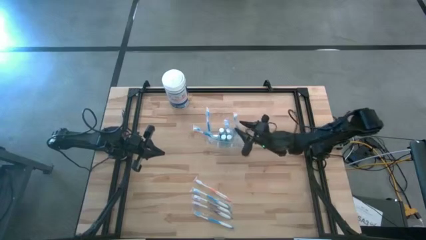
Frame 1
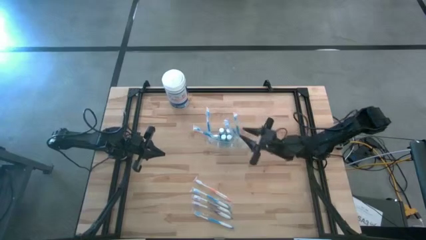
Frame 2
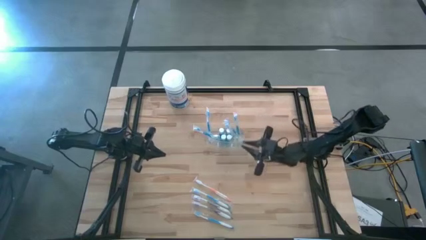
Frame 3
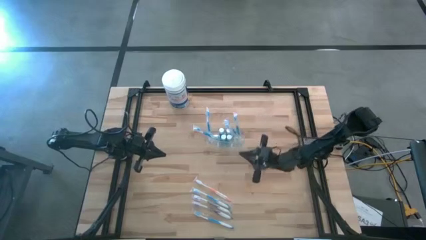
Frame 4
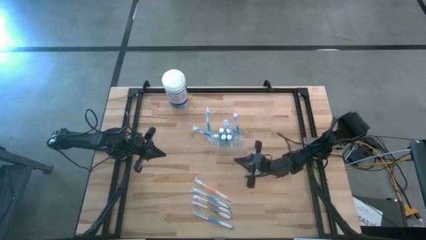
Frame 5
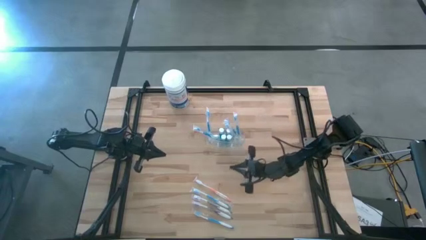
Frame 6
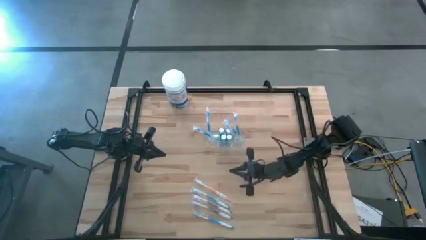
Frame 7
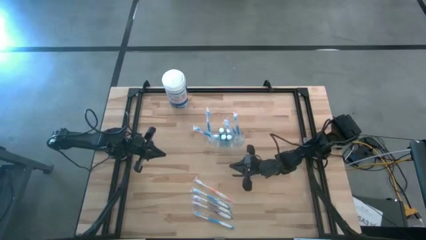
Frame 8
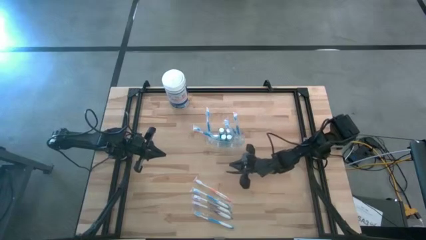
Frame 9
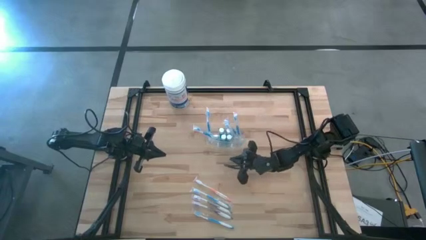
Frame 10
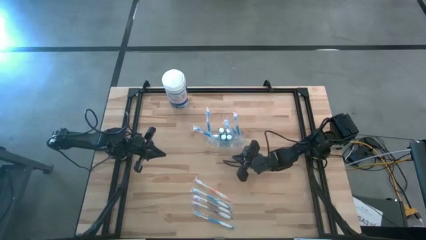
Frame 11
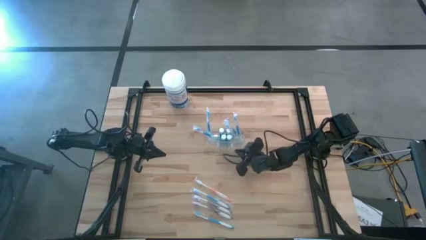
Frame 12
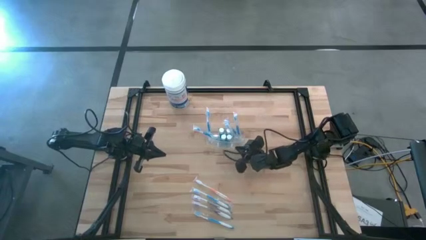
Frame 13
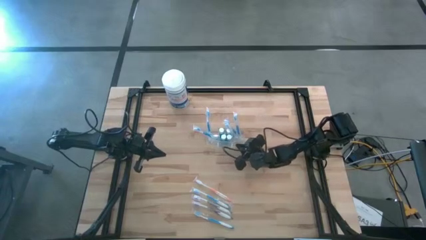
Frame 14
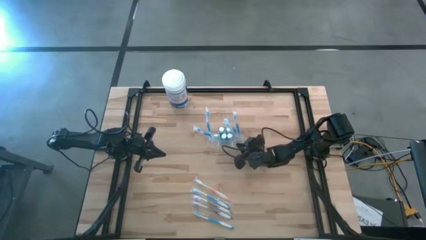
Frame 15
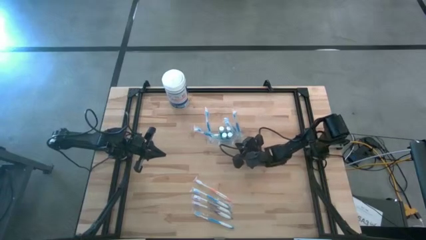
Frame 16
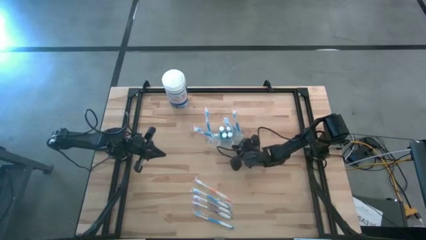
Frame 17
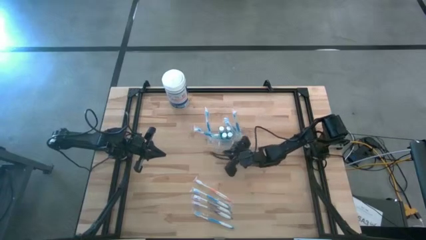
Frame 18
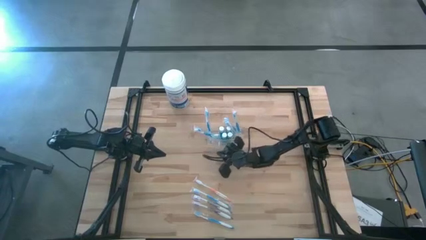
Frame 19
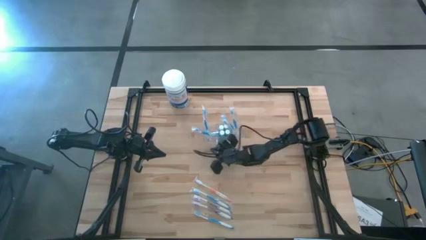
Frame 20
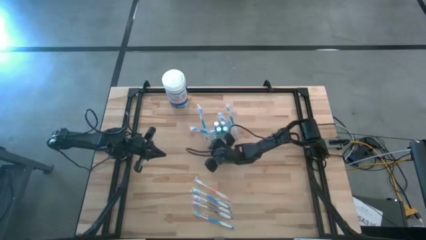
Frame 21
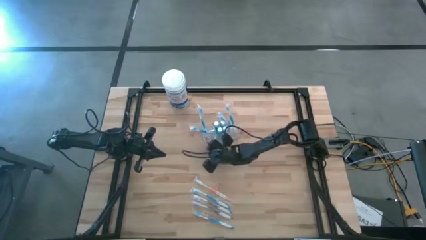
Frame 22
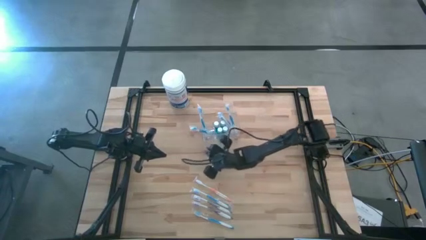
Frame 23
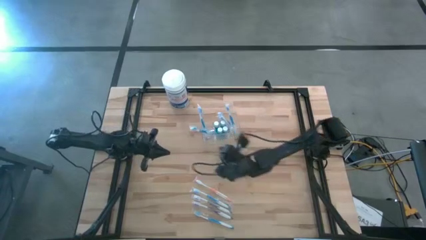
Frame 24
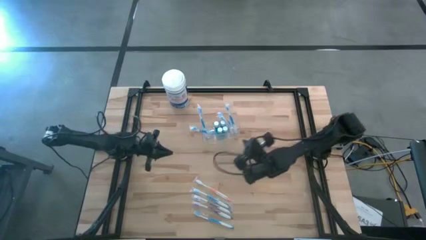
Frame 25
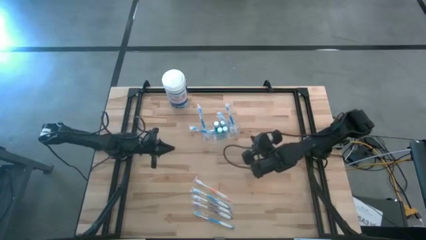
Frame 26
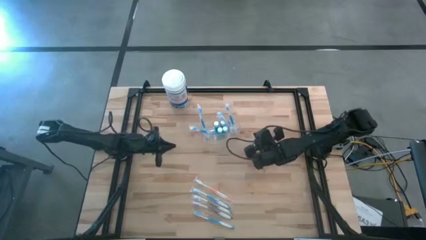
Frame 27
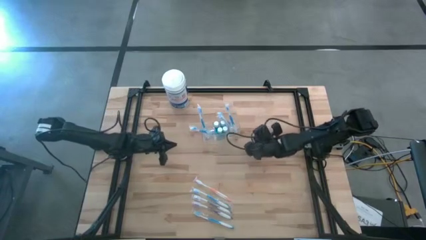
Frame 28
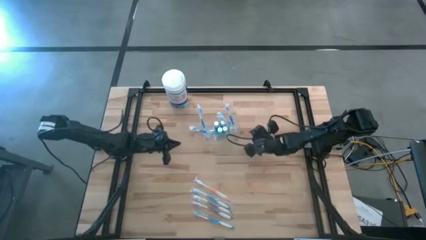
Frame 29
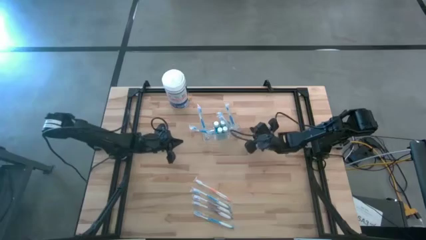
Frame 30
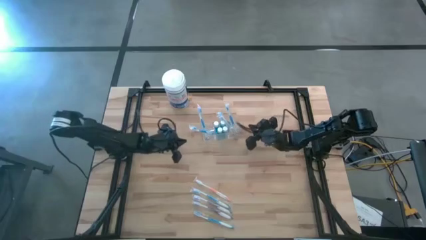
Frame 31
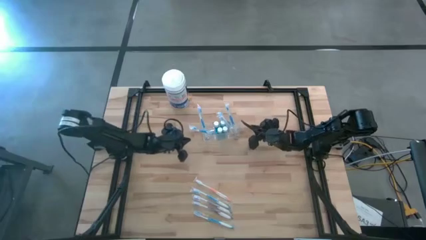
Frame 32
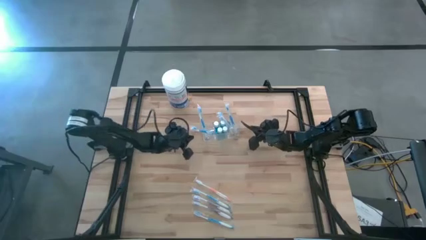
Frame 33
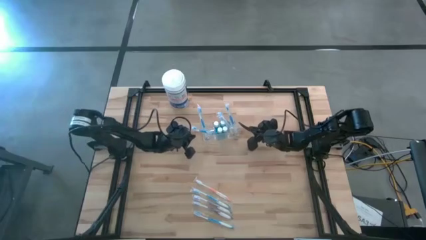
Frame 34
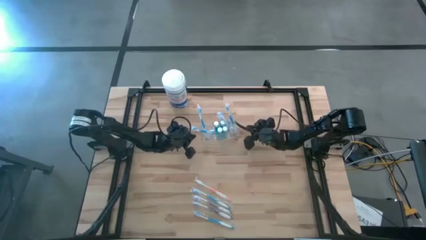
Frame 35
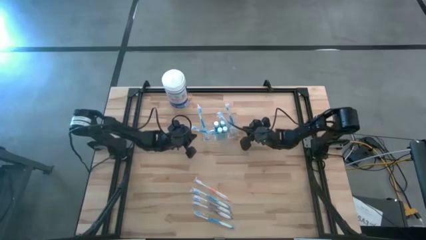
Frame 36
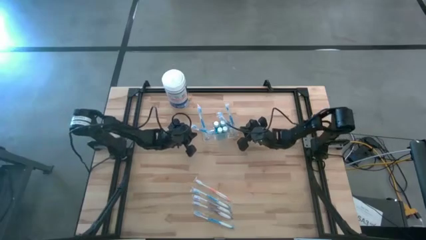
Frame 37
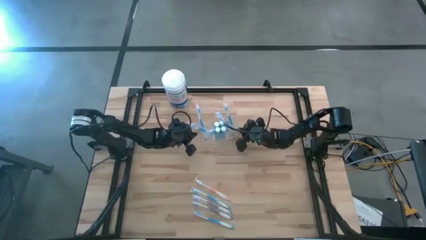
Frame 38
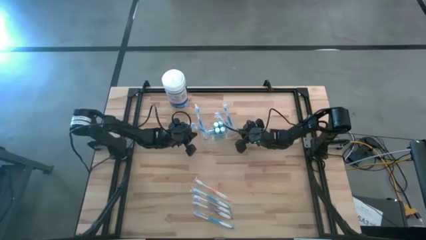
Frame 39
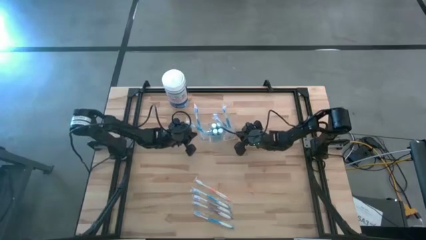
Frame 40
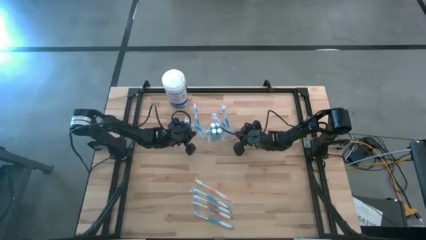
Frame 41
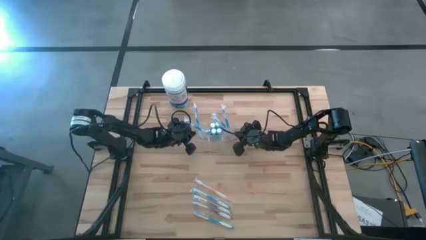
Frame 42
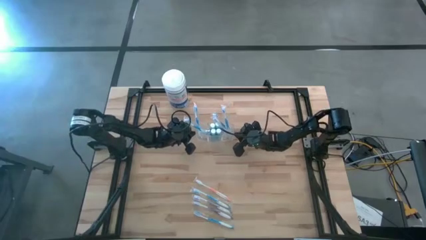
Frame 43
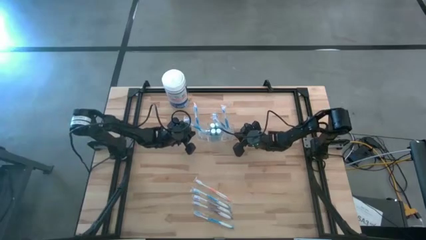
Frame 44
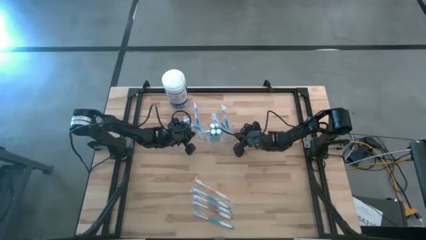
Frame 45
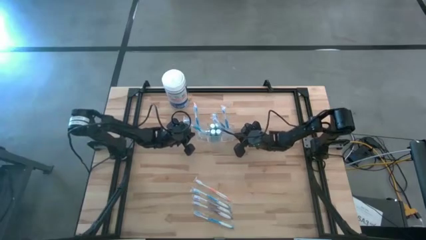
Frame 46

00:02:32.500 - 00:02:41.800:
Task: Pick & Place toothbrushing station
Adjust the transparent organizer

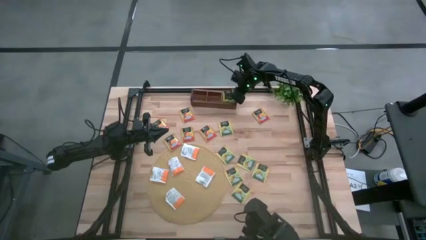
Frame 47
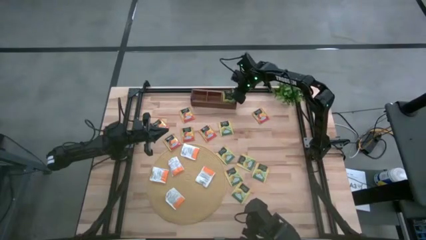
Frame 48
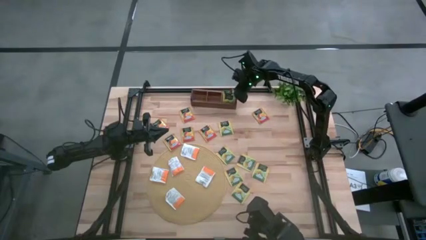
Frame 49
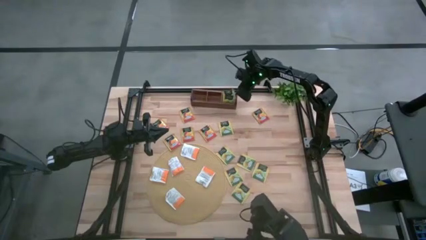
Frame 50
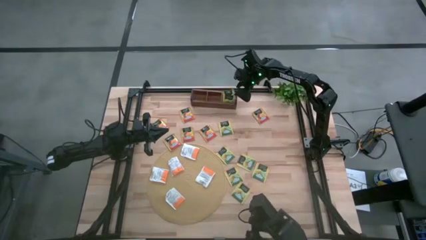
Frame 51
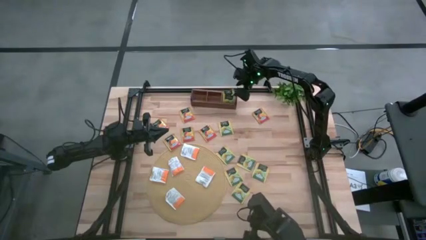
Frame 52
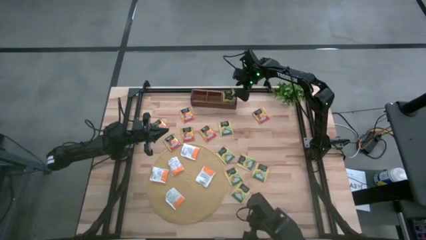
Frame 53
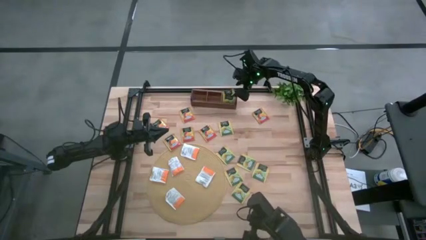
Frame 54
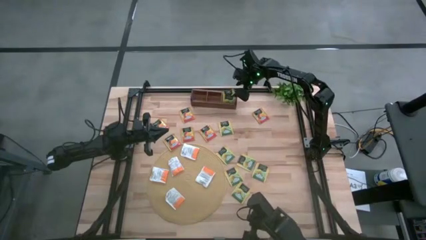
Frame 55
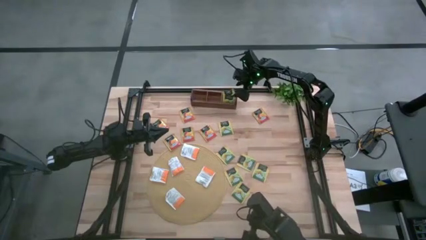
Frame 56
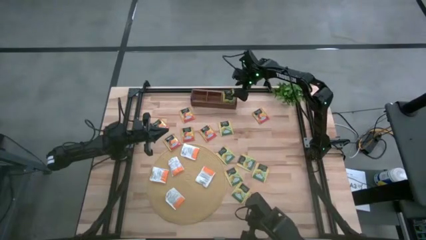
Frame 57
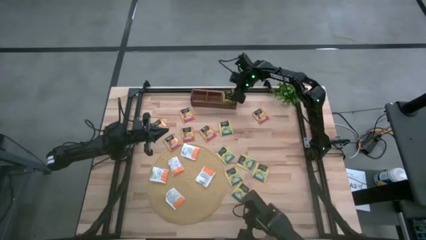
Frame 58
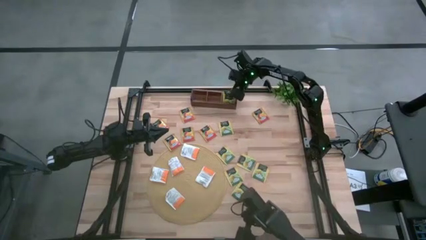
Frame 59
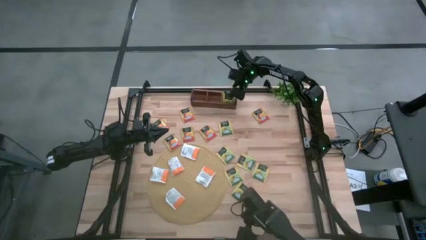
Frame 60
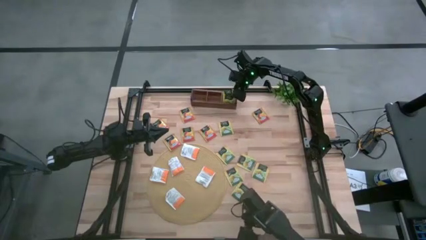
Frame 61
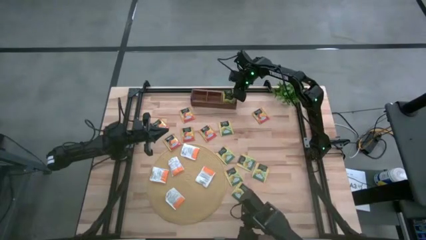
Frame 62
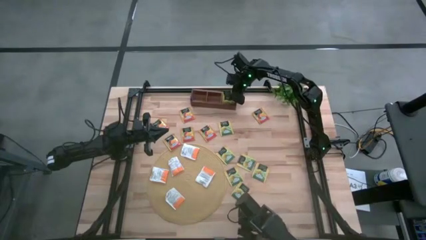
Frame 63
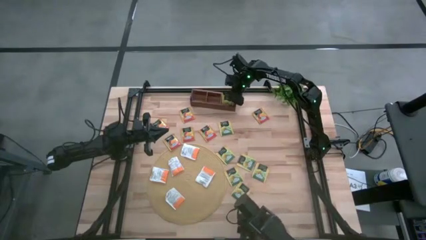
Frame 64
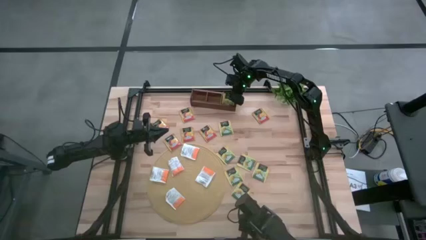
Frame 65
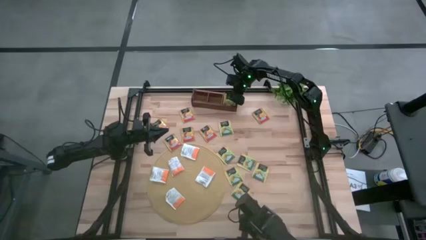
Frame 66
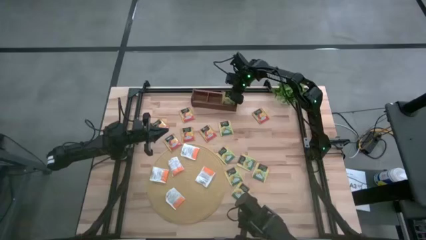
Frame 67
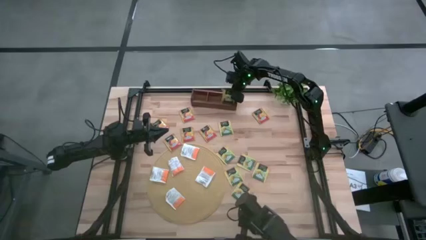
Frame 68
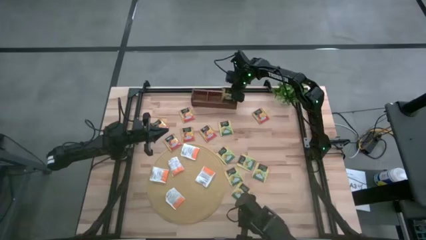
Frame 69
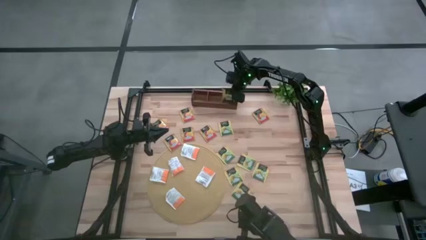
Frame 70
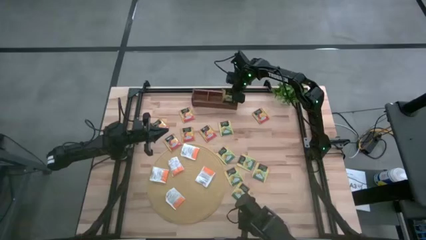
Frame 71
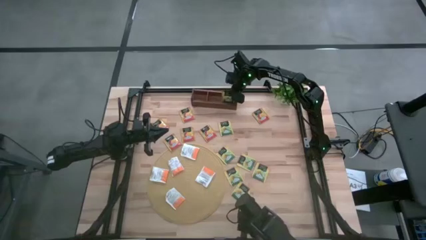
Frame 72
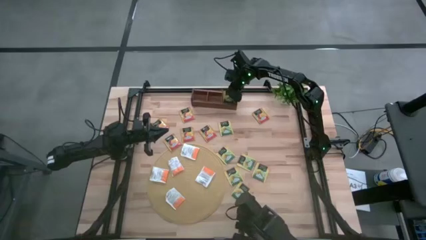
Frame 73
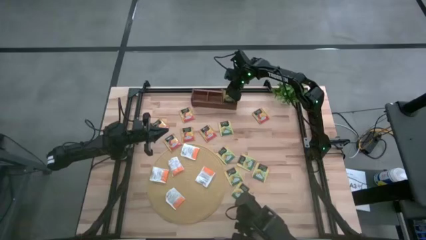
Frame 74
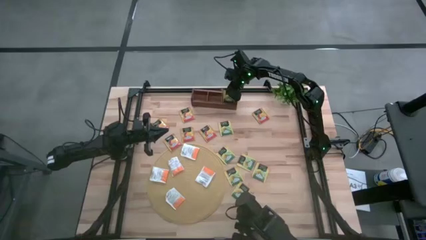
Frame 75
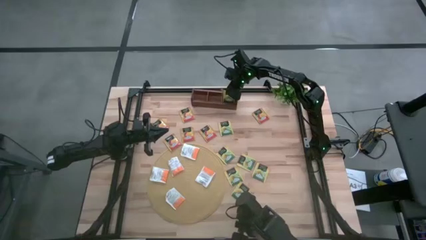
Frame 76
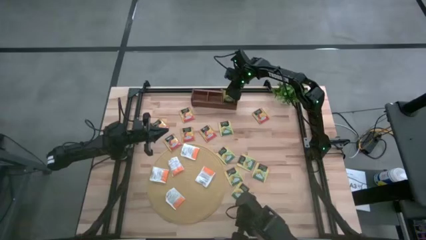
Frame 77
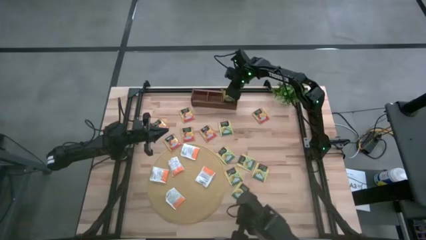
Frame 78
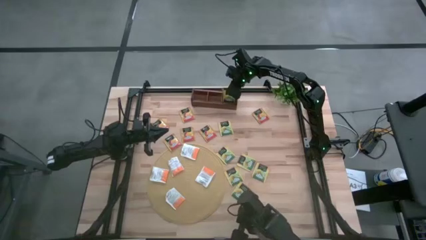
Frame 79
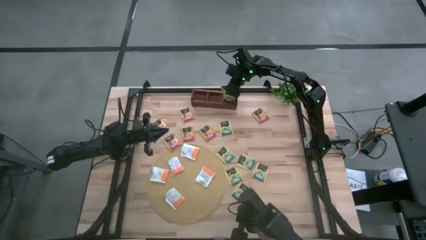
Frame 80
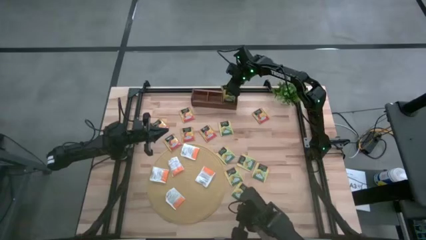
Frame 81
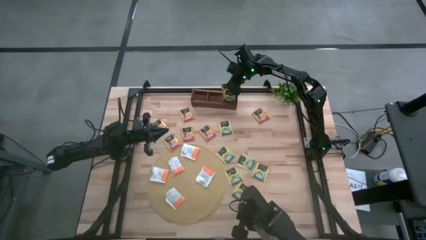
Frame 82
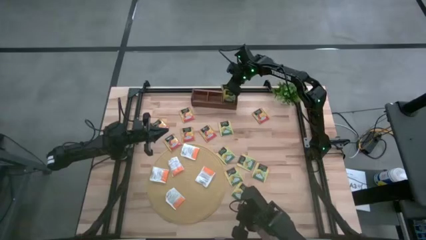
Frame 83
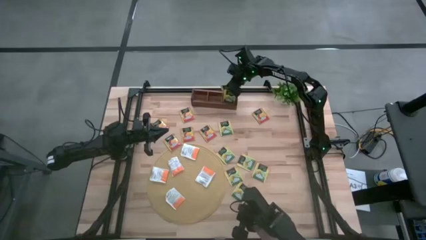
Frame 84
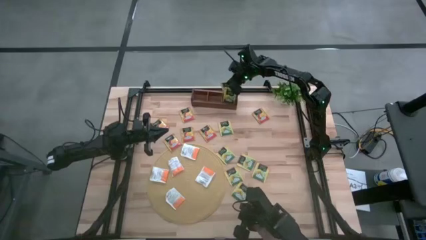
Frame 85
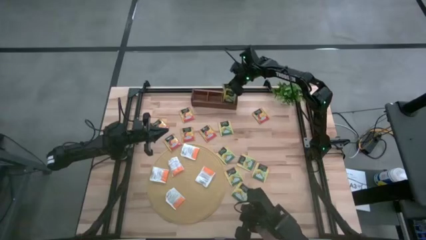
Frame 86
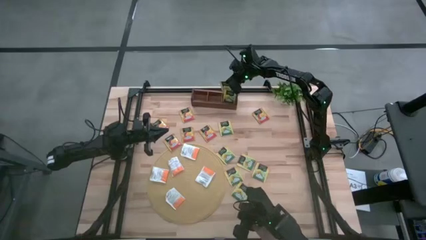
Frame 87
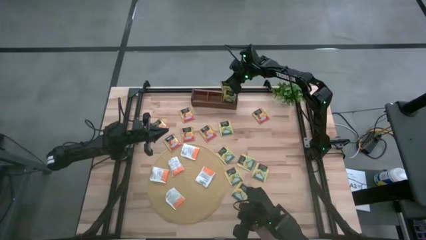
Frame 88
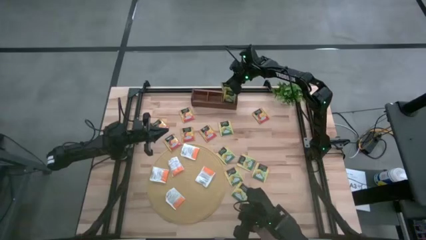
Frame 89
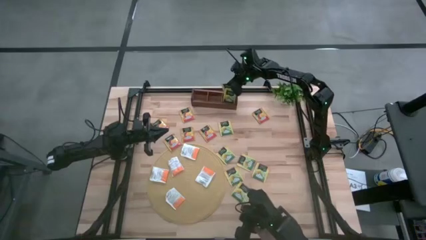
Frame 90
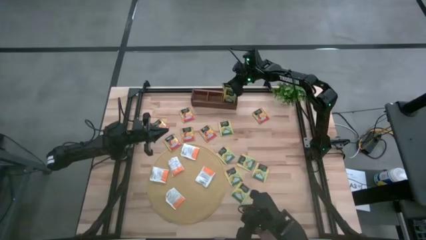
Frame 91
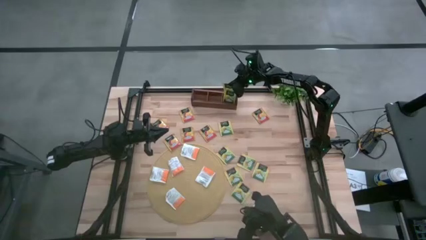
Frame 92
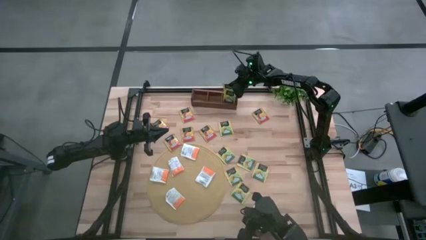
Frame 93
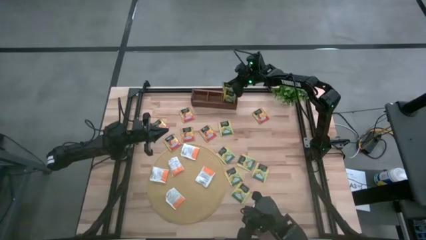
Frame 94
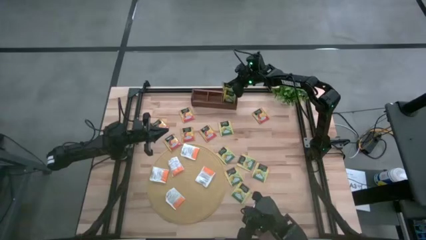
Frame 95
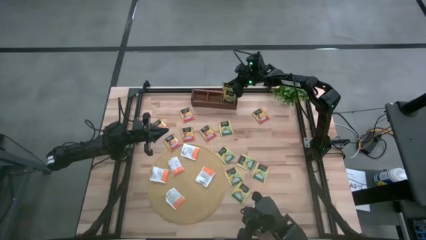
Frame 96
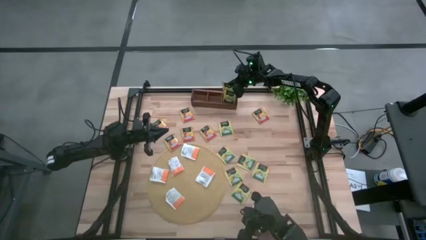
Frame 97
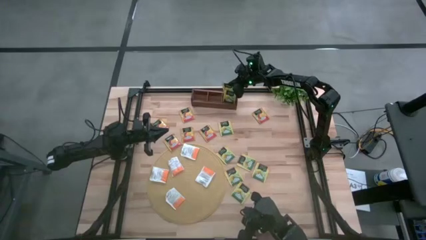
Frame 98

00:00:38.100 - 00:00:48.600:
Task: Pick & Place Tea
Adjust the green tea bags in the wooden organizer
